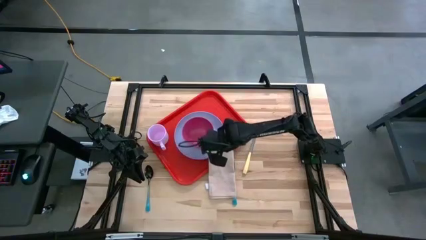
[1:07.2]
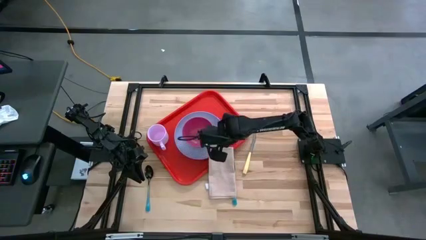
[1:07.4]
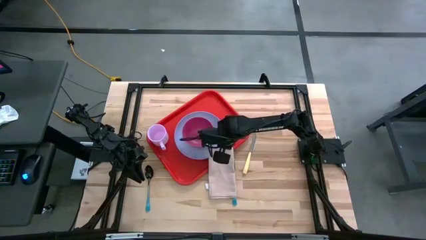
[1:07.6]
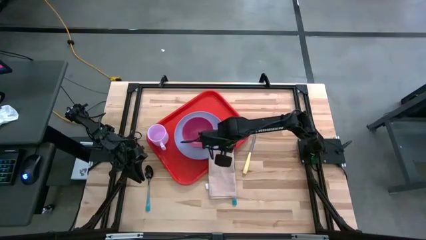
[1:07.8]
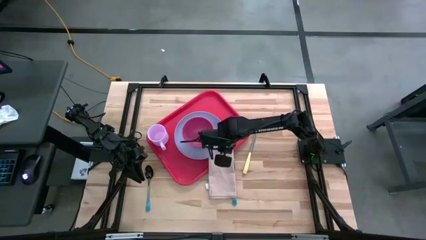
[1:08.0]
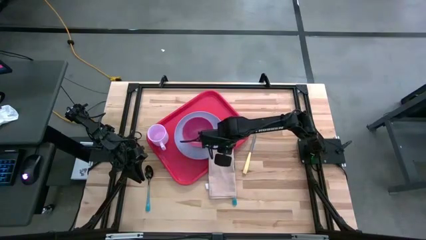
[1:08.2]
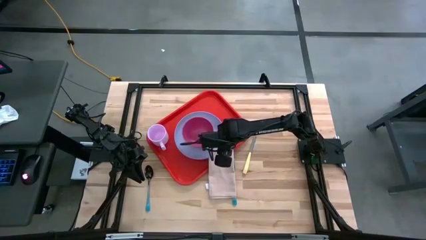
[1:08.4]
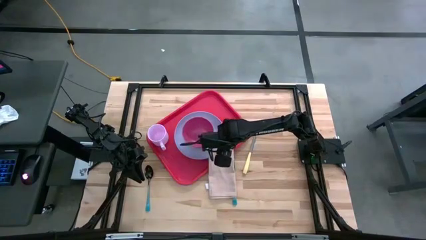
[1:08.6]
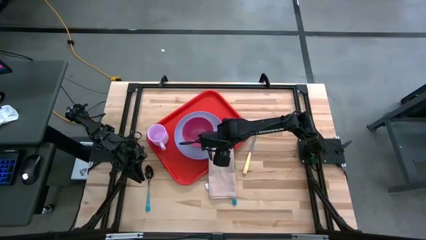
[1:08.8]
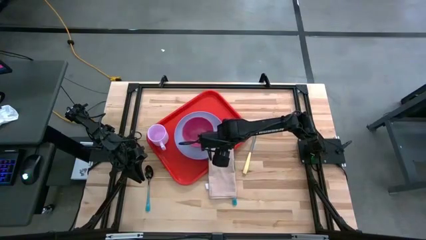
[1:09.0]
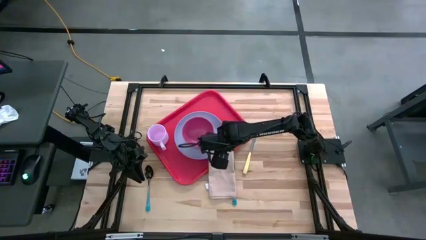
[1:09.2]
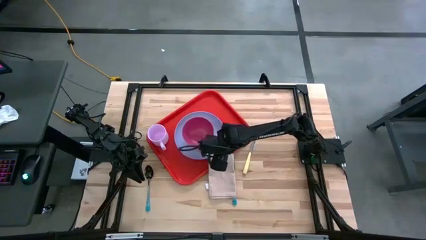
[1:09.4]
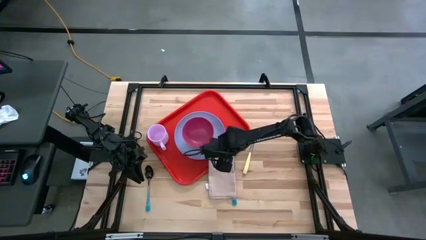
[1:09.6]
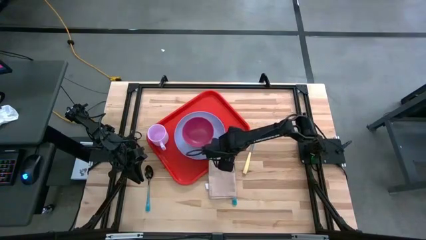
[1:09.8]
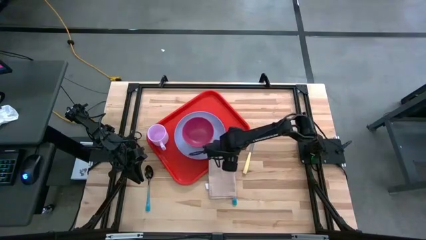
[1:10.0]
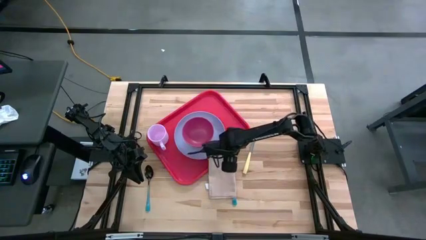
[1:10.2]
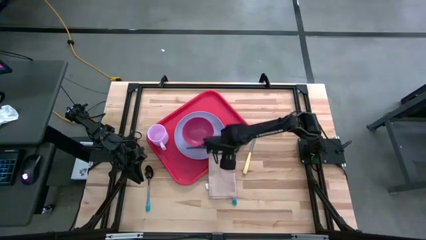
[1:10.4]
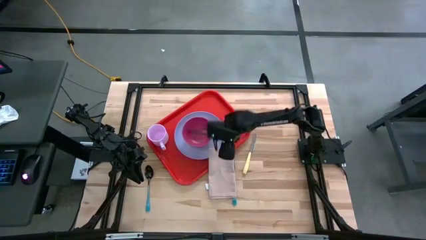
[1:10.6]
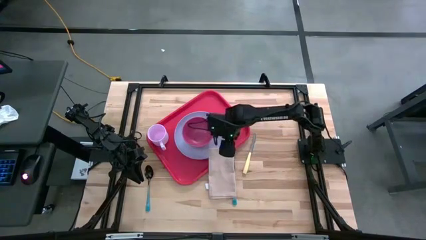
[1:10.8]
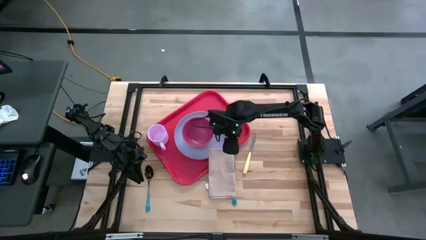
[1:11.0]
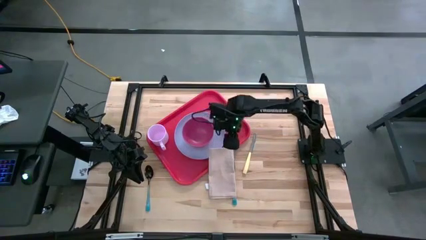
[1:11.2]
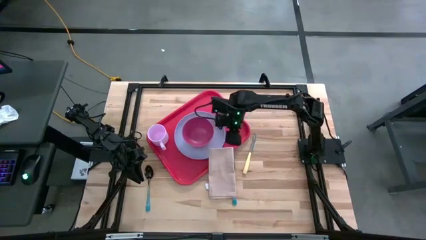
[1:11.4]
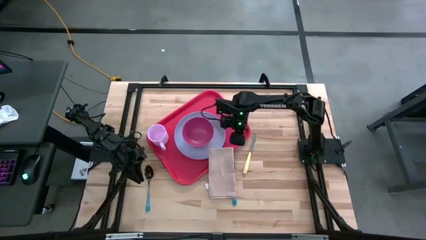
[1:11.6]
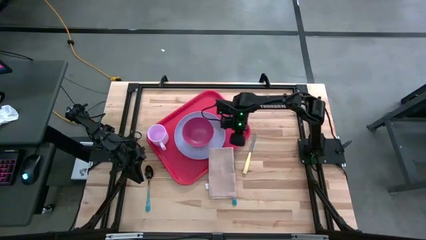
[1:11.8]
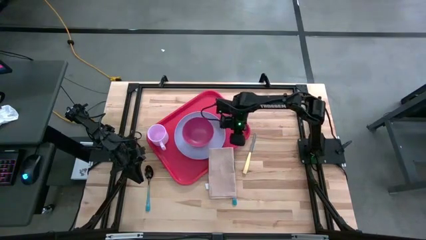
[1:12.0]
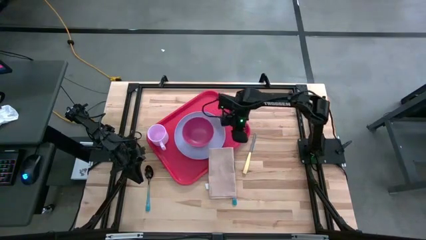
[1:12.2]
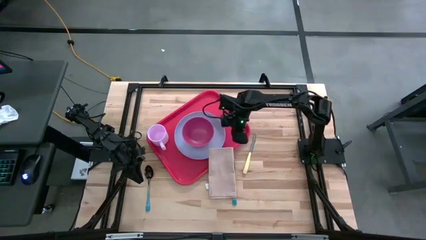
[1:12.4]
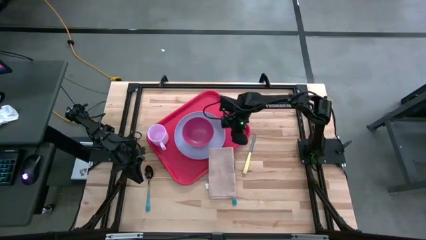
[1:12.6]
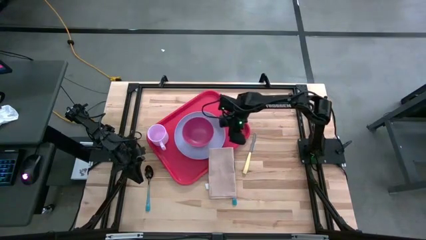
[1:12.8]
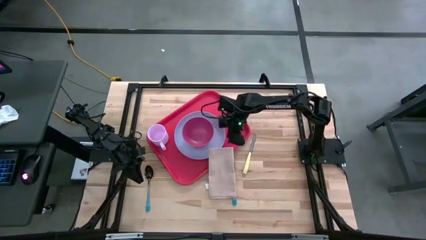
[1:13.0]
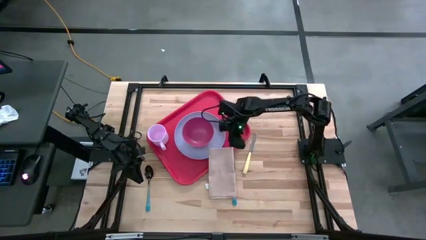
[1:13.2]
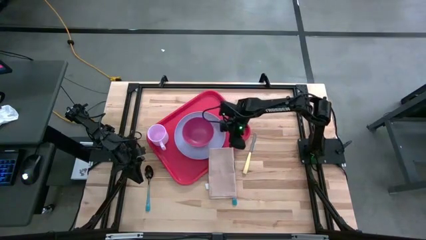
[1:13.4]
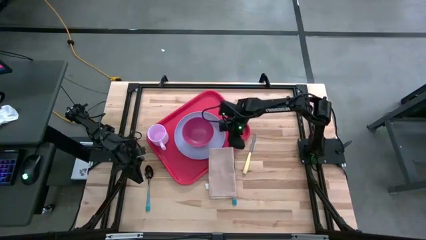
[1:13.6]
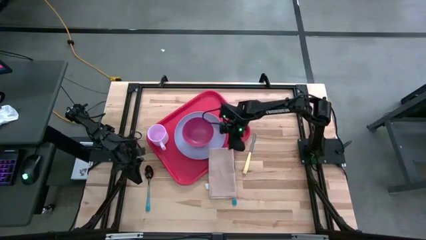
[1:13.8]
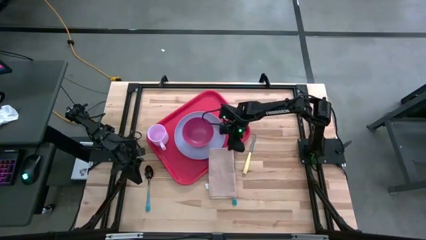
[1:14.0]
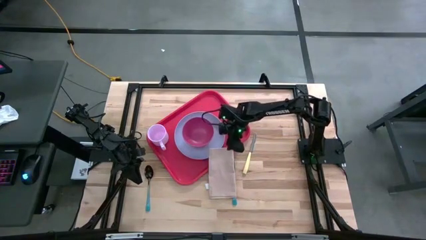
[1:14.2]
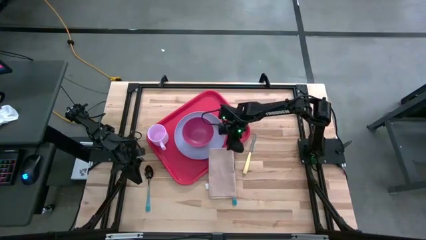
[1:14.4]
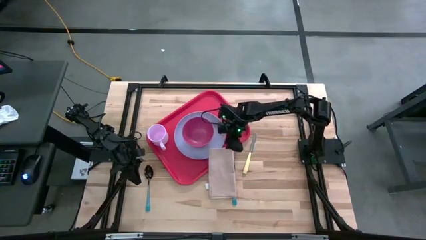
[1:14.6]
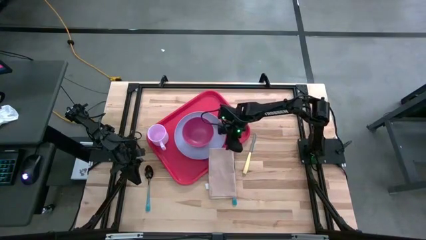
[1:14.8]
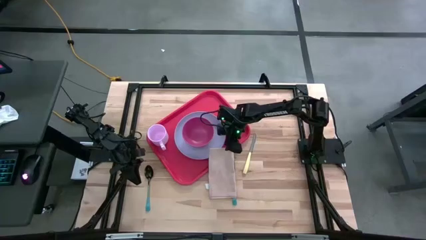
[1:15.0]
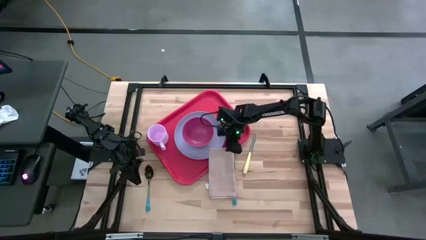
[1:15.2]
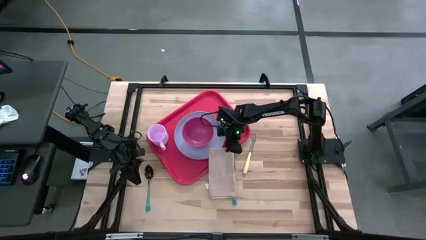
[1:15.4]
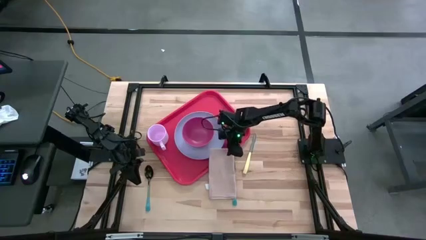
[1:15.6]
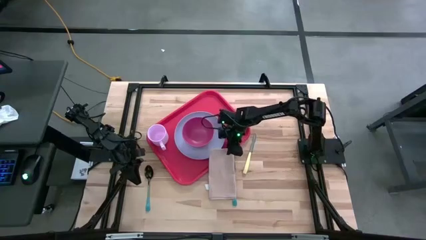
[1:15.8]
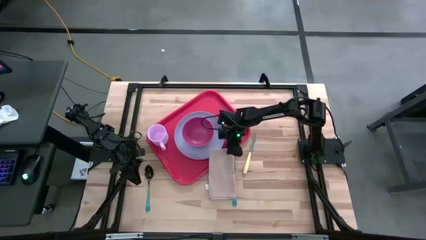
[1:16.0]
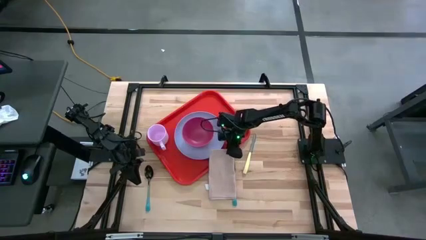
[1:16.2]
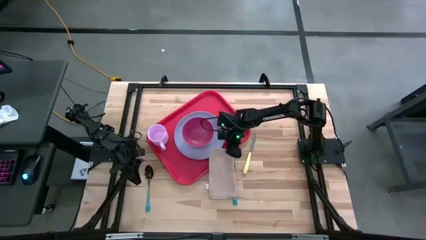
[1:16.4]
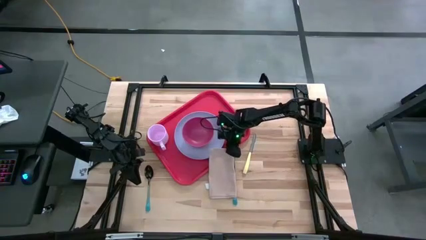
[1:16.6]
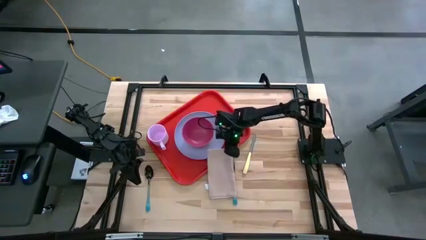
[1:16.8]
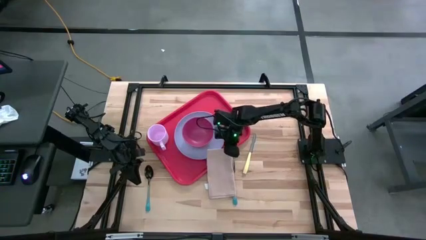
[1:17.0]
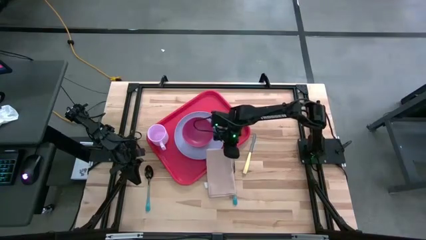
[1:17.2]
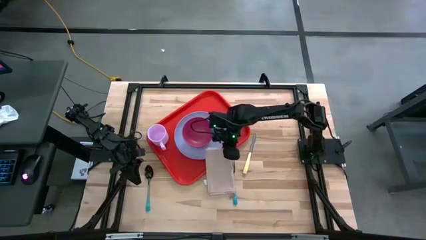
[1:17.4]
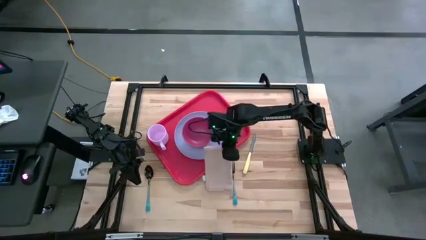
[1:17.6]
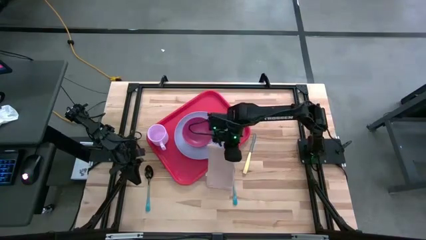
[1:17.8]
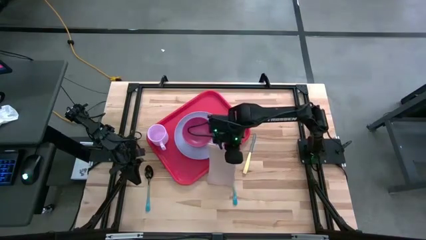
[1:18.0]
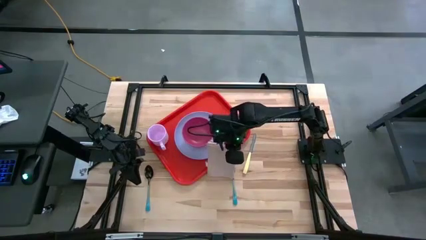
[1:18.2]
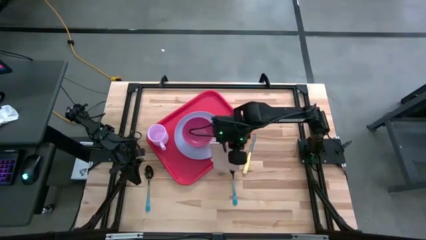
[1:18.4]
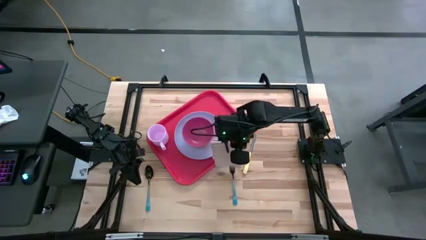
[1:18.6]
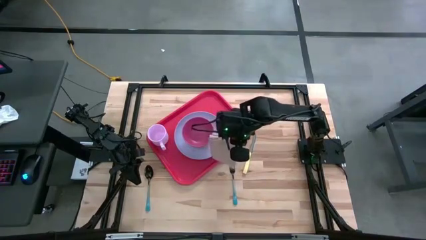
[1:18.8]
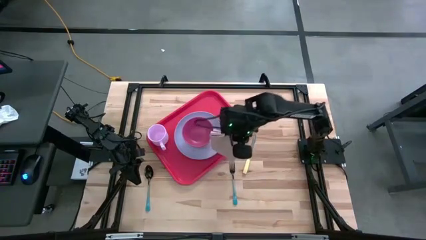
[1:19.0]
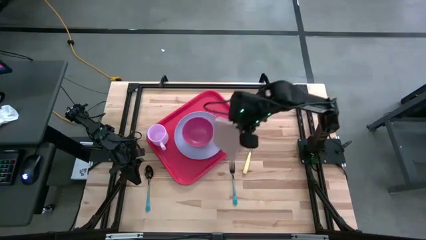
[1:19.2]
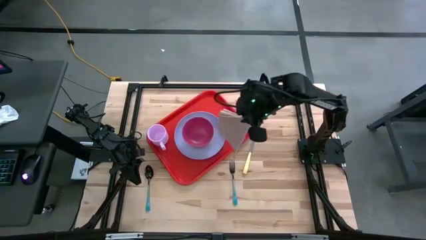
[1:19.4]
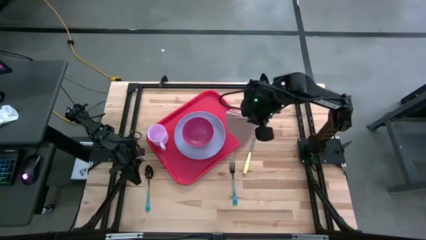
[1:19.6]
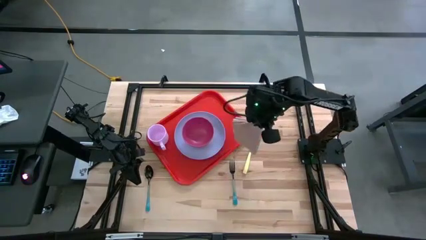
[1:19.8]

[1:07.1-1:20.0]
Task: Set up tray
Put the brown table napkin to the right of the white plate on the red serving tray

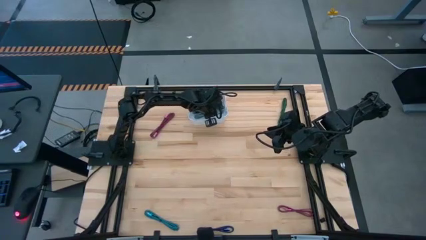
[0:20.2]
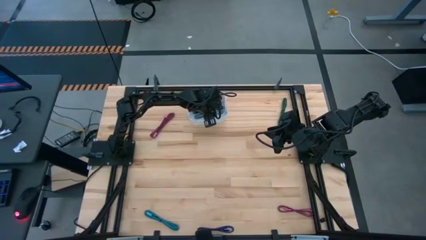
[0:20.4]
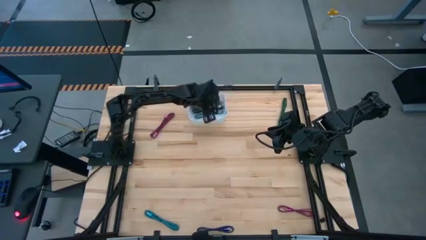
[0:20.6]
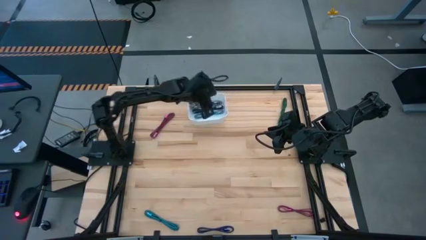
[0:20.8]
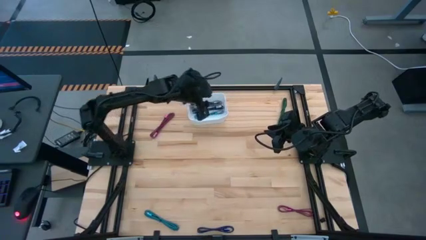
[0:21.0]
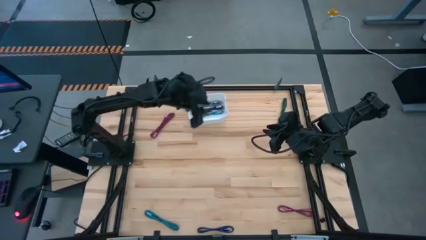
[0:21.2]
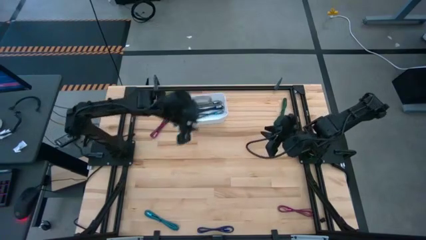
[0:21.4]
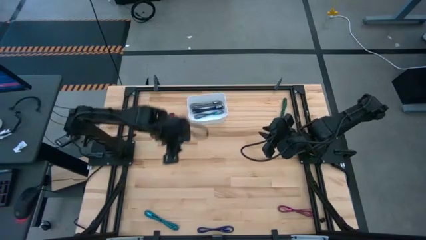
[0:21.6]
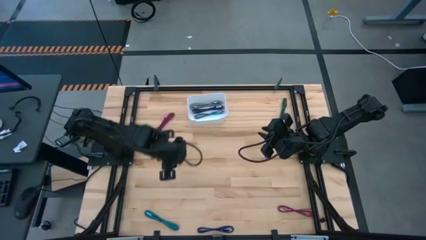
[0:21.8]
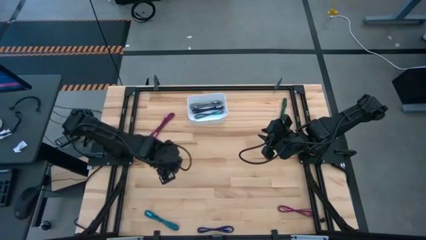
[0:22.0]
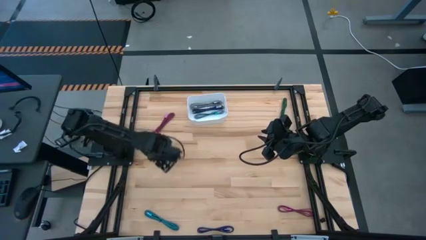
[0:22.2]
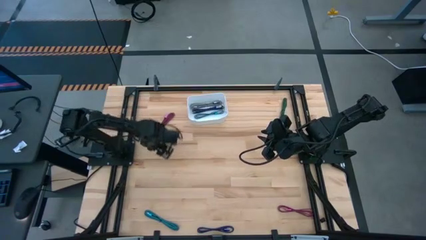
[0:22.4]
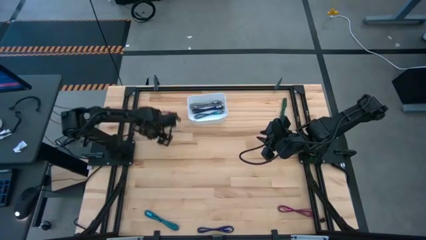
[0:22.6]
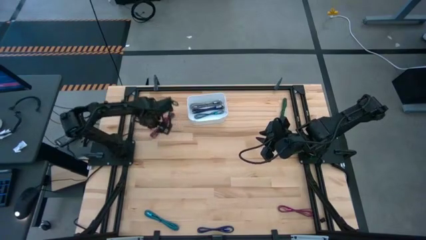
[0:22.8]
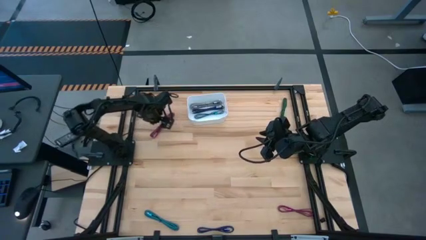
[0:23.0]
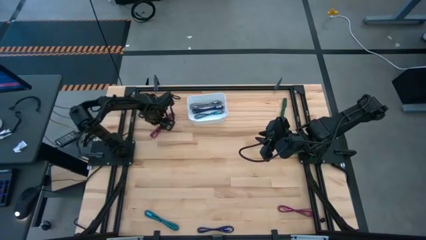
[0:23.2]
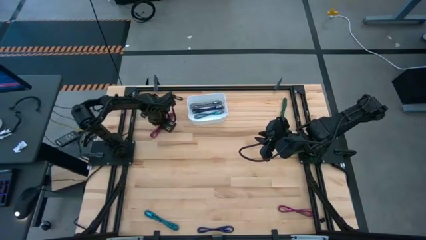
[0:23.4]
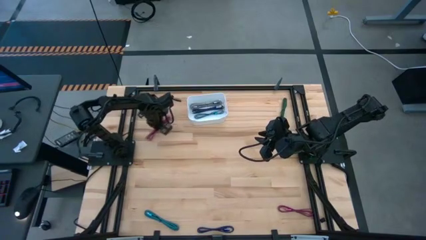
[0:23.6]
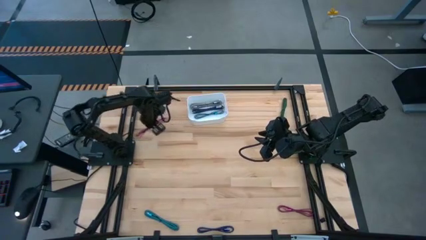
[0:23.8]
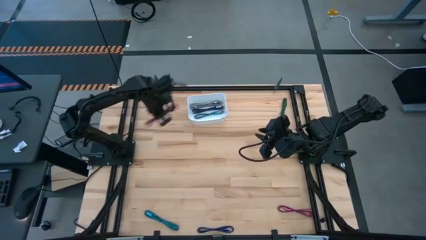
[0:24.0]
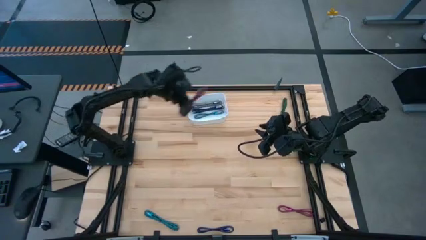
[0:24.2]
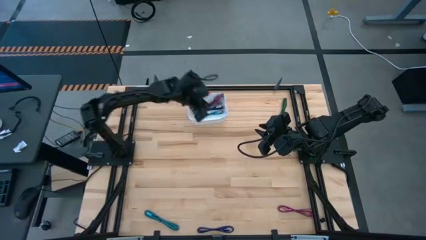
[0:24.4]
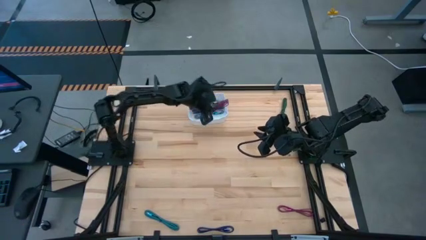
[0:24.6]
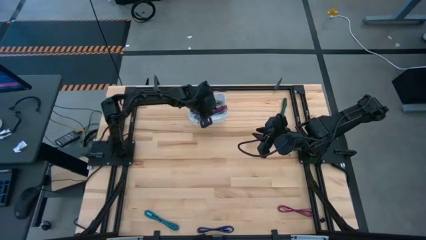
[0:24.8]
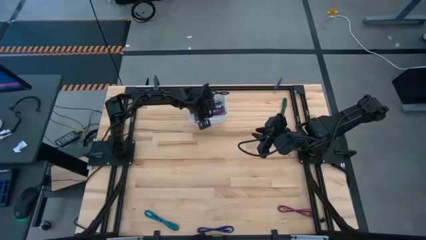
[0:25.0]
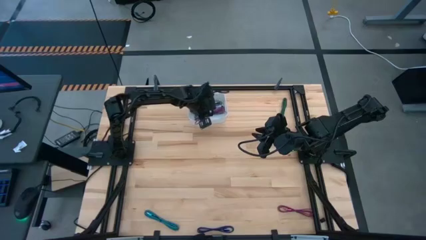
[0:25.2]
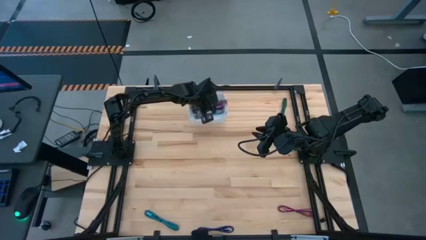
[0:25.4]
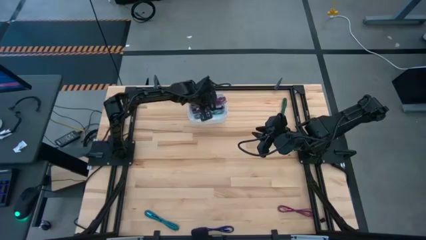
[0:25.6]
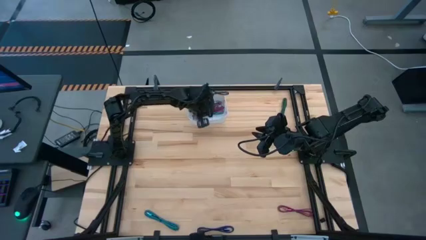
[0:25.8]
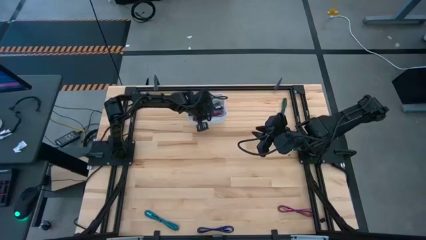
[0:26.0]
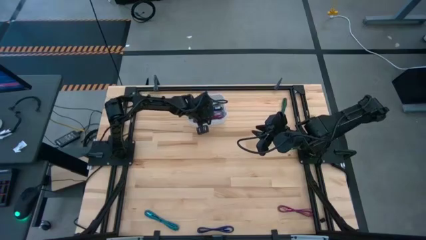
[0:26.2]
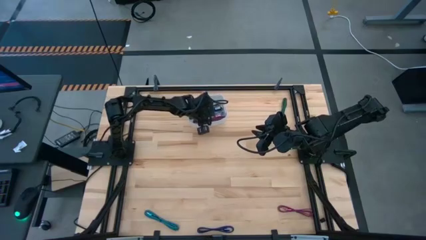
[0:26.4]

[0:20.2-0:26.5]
Task: Pick and place USB-C Cables
Put the top black pink charger cable into the white bin
